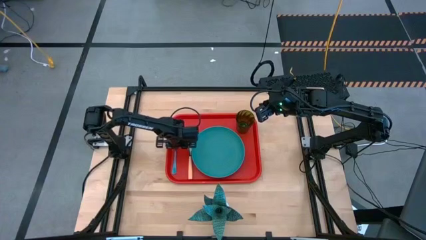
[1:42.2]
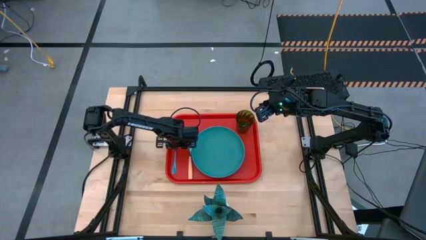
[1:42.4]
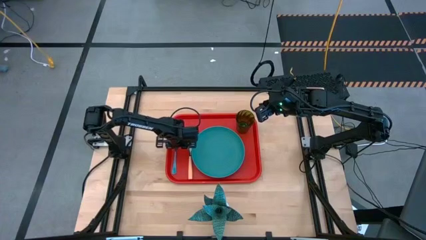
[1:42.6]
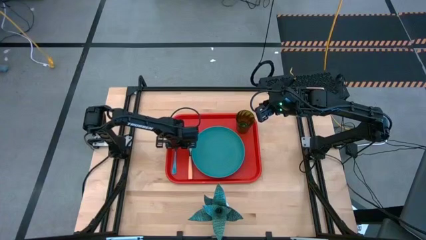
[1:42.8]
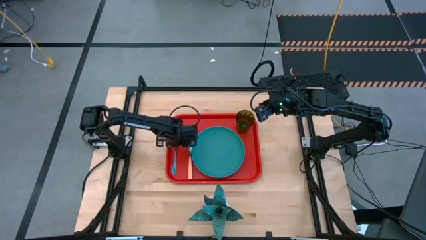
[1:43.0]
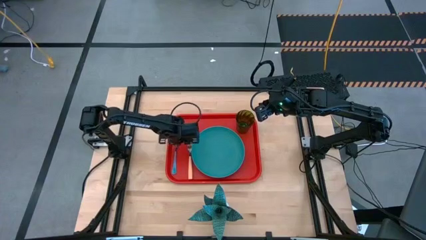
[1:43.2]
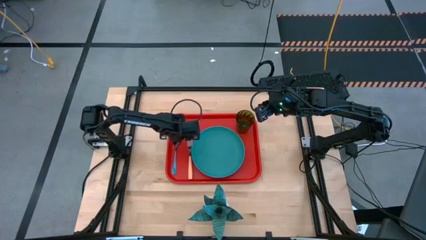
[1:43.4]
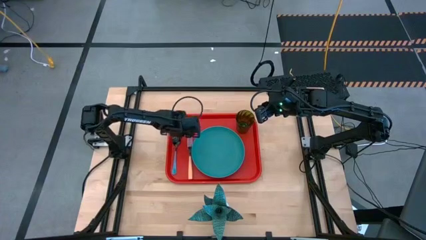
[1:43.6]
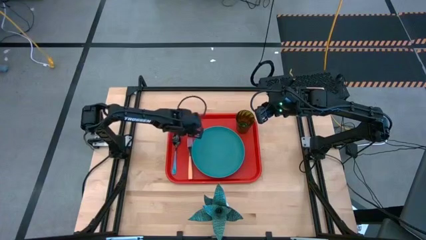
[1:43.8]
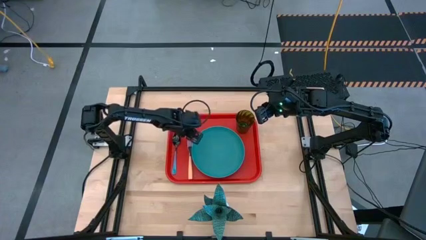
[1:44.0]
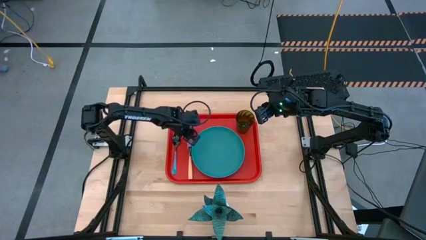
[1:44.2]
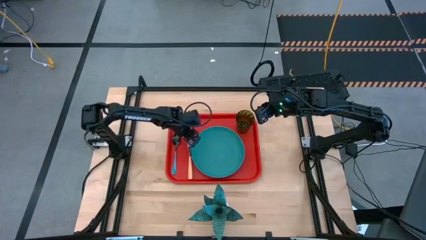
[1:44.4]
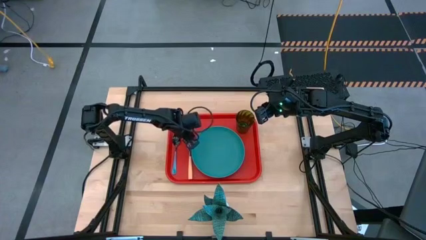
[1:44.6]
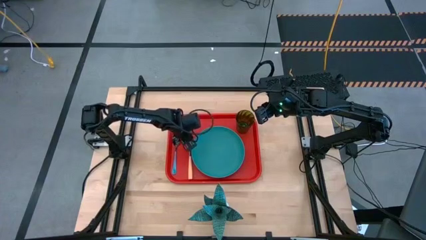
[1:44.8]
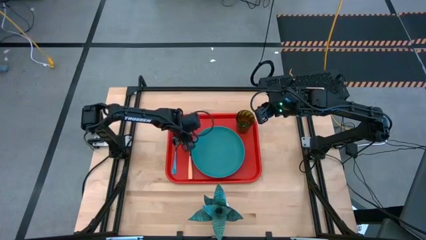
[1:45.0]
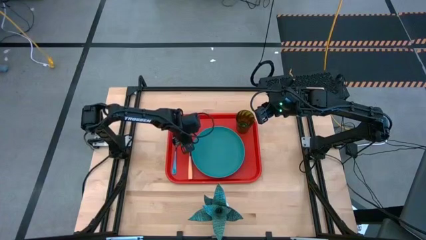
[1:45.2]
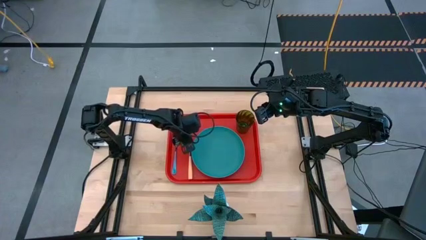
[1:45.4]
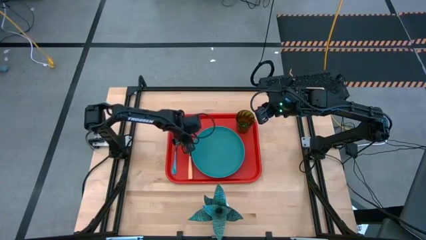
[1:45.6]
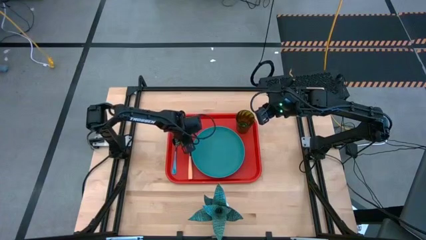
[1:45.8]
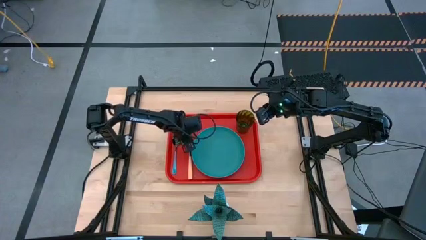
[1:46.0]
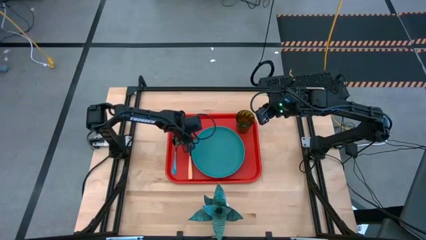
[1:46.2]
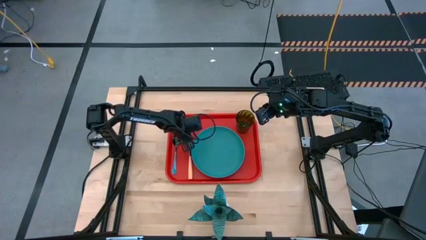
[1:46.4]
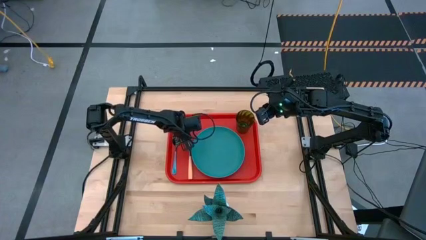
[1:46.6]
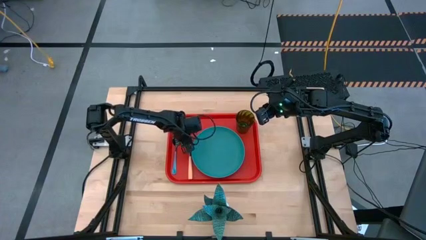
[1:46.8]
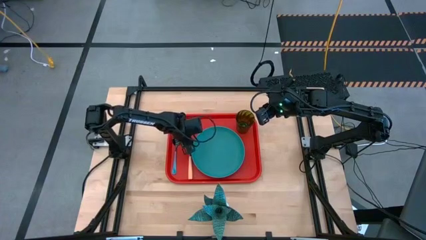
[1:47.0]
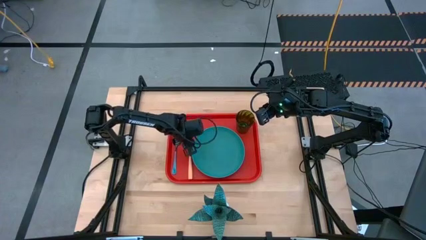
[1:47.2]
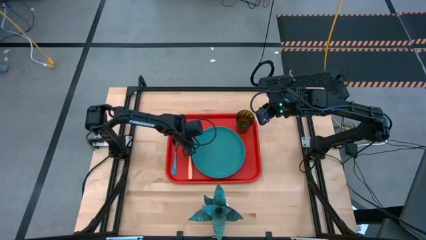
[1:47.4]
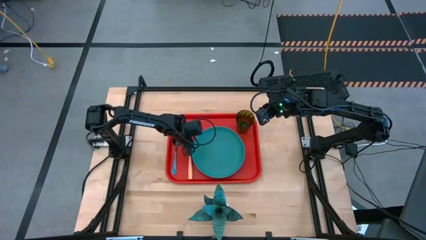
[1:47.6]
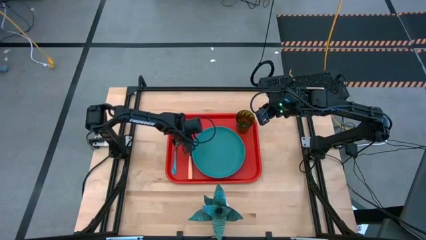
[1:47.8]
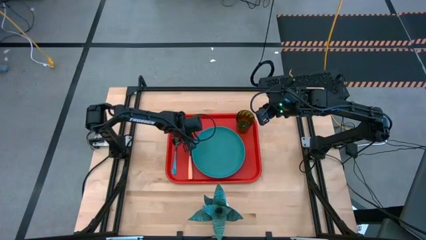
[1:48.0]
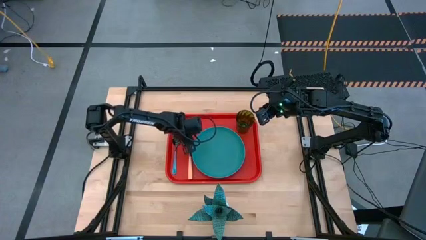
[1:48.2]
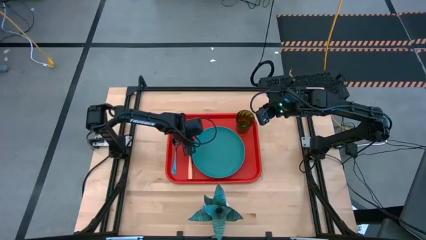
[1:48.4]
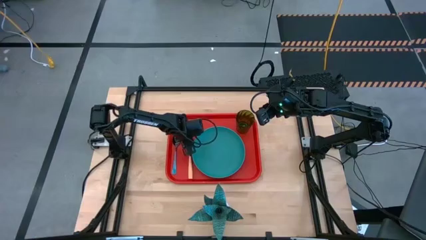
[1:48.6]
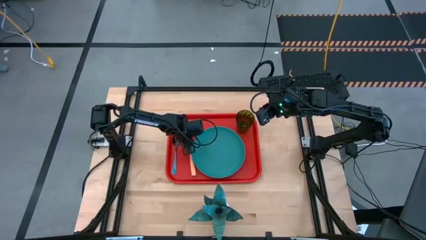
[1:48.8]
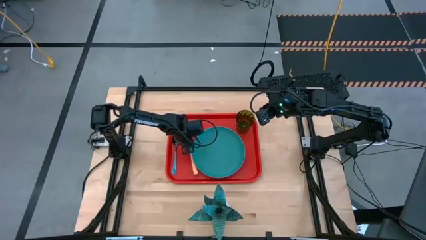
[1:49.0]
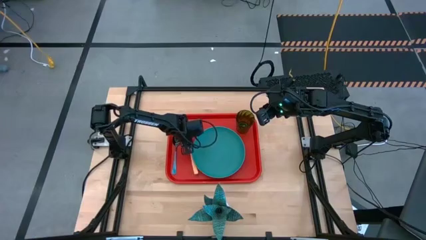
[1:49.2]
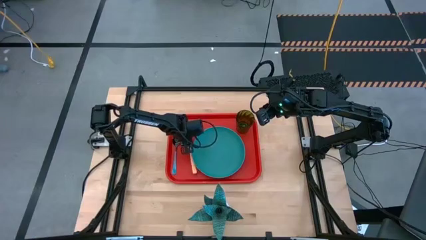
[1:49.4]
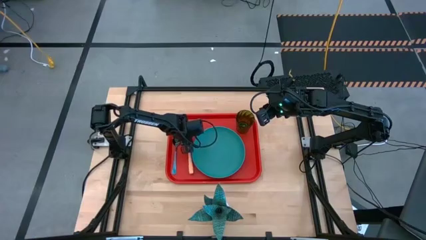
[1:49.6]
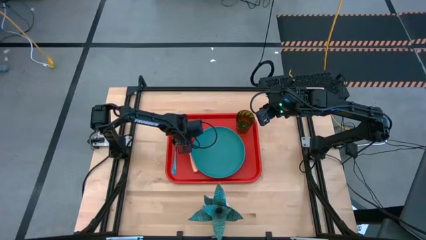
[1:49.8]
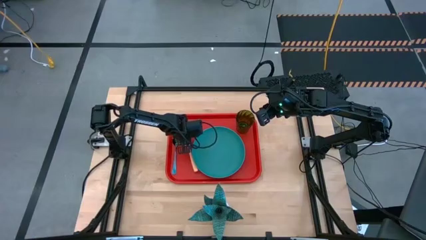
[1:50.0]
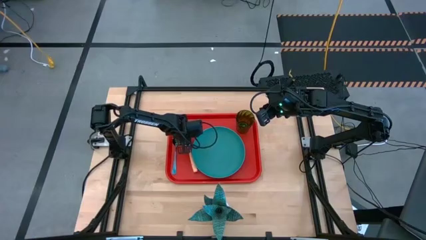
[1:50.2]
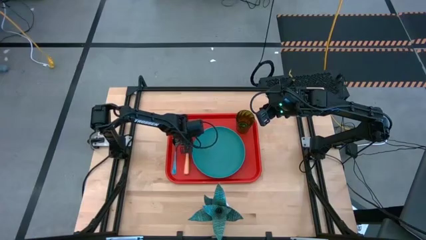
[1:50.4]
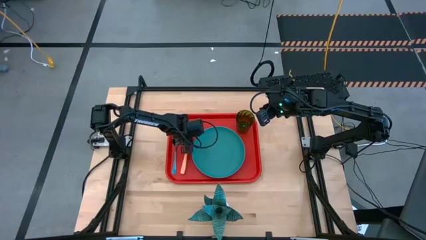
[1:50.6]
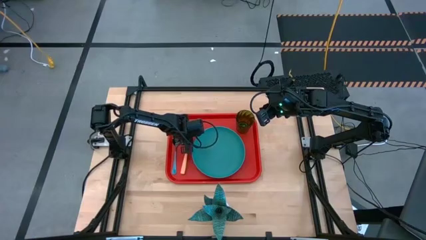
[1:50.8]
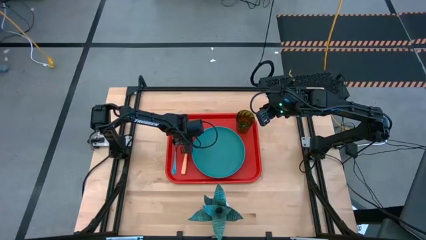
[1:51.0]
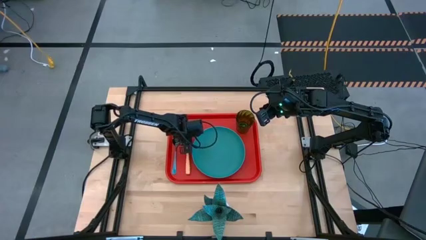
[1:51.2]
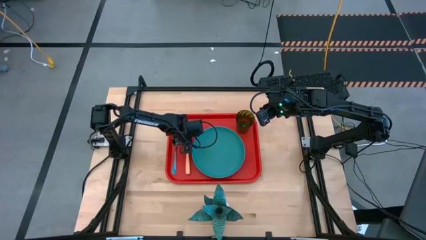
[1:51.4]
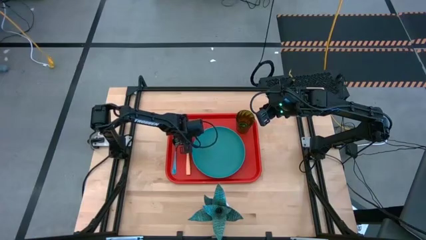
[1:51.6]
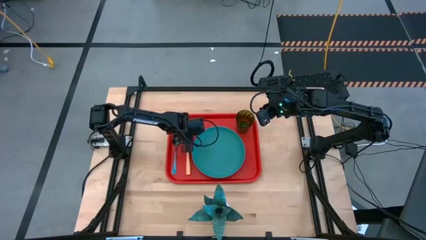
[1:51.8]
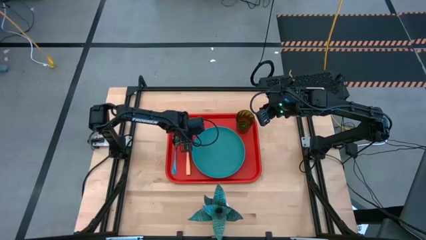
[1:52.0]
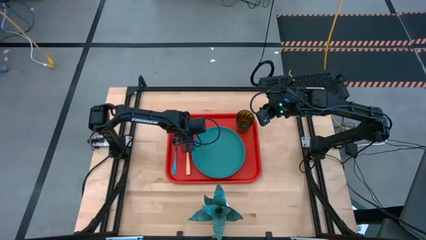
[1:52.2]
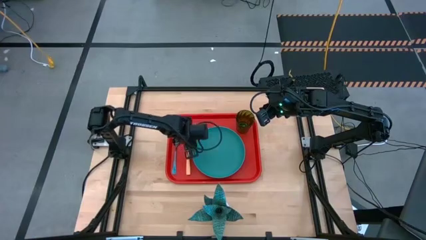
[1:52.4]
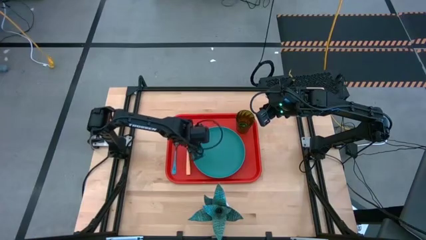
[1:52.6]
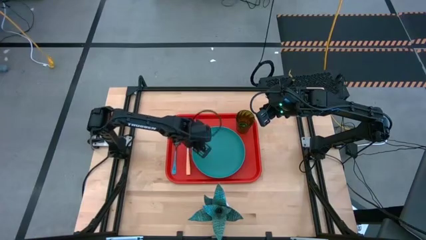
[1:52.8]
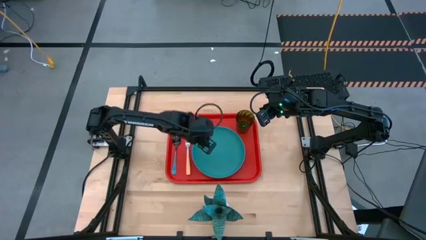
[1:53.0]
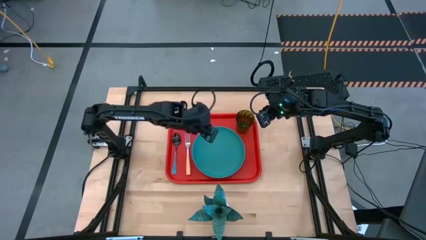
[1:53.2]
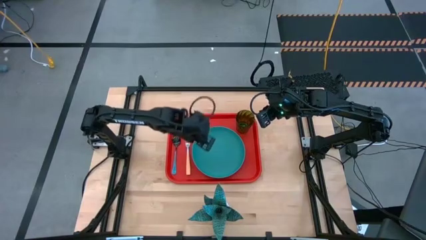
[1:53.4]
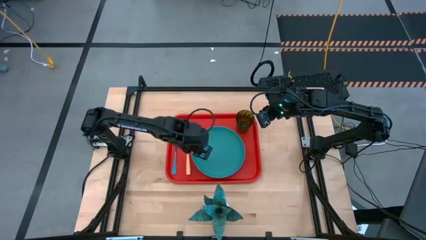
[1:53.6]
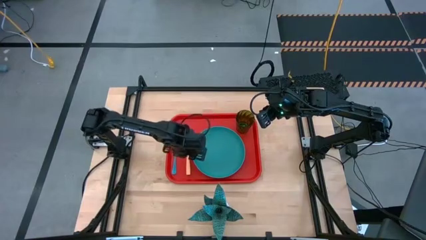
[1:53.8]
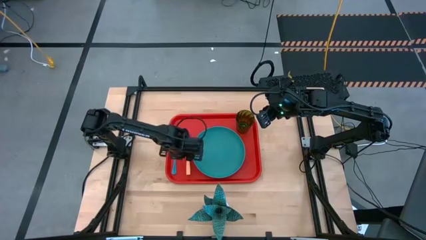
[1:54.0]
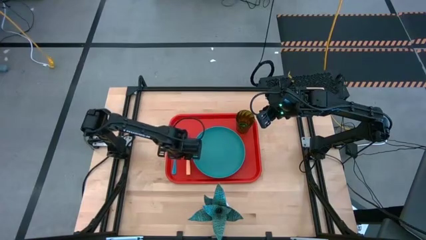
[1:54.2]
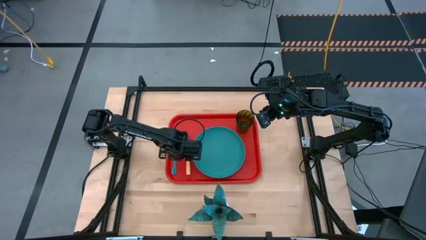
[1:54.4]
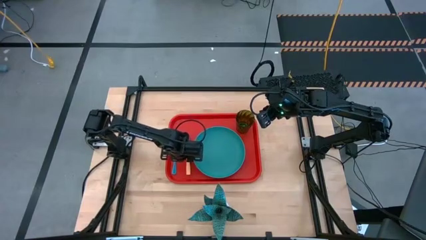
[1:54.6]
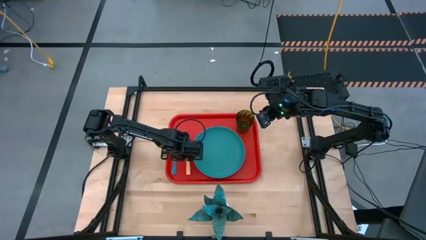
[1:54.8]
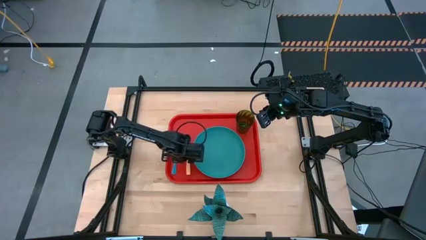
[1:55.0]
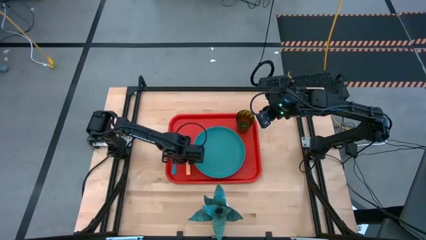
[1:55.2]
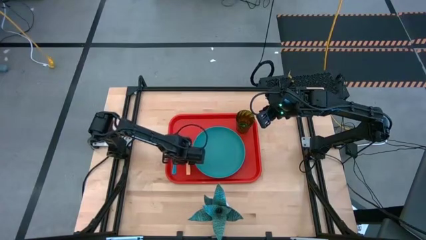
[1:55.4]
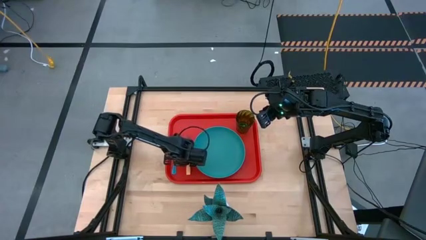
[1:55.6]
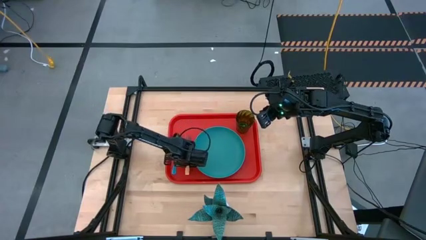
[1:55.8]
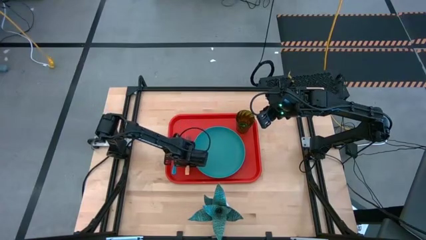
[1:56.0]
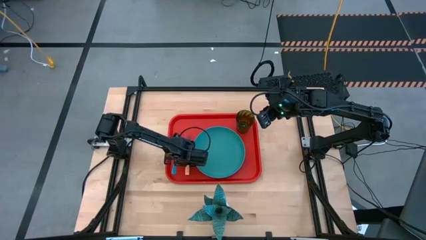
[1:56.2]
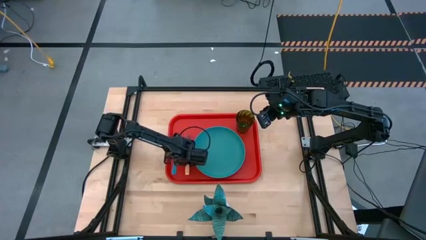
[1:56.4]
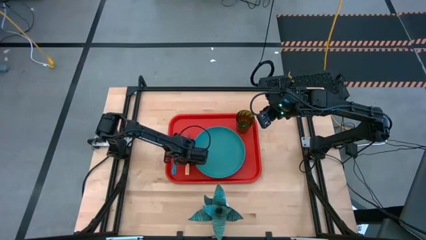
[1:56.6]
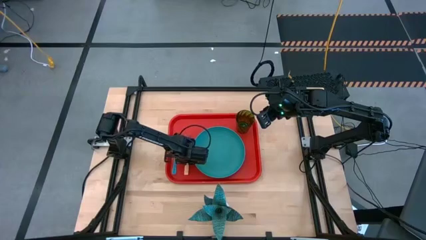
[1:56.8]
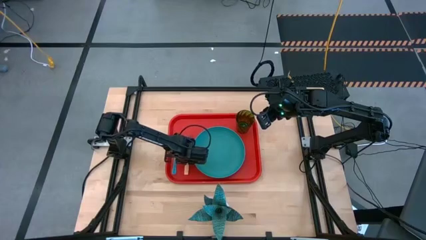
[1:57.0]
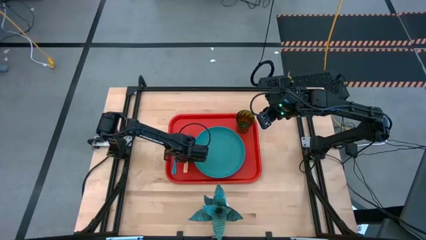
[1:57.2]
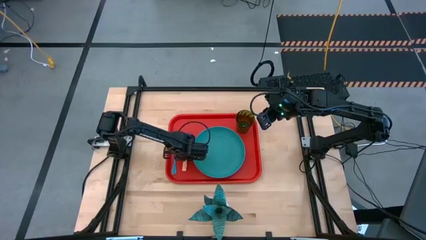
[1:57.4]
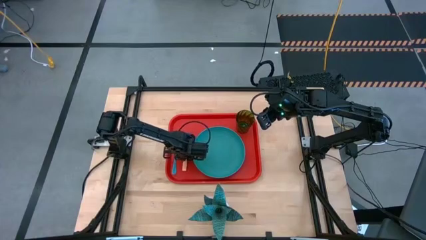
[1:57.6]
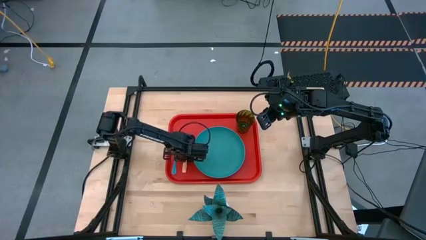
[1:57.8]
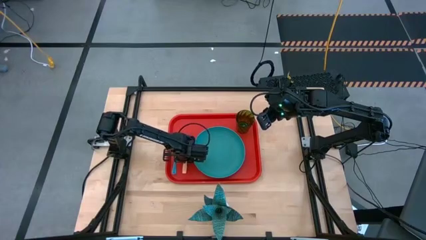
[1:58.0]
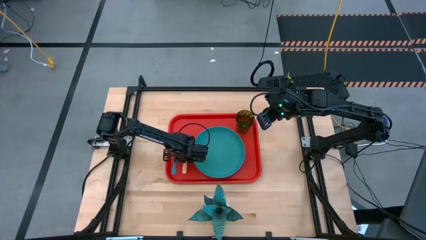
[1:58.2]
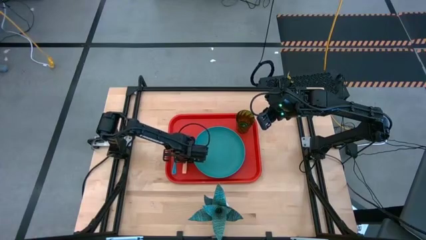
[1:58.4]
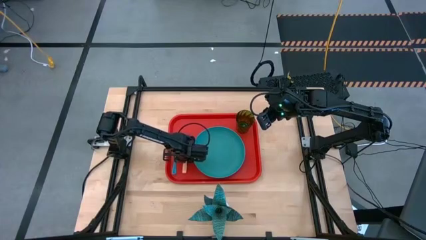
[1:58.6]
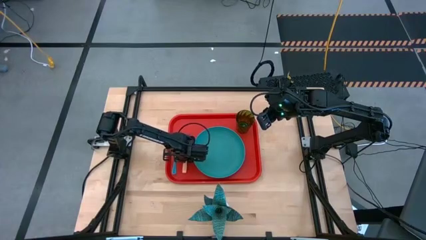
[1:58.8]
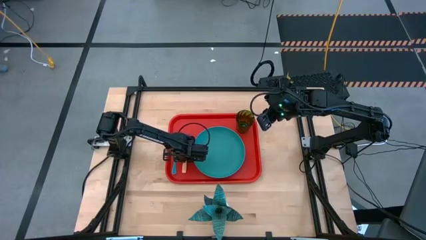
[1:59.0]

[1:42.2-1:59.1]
Task: Pick and place plate/cup/fork/spoon on tray
Adjust the yellow fork on the orange tray

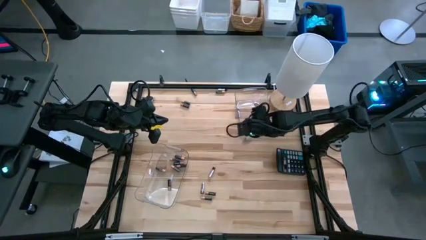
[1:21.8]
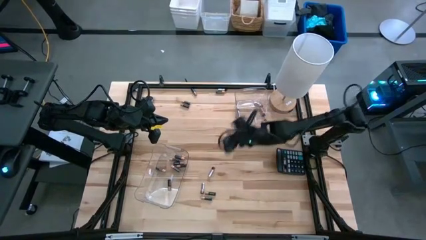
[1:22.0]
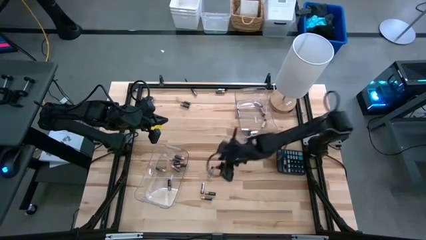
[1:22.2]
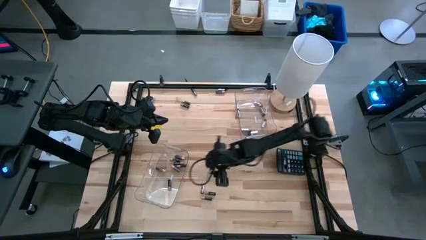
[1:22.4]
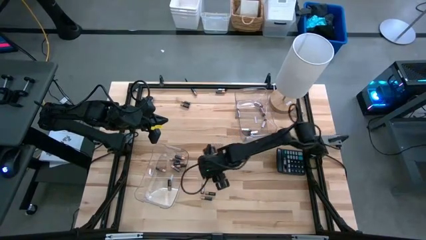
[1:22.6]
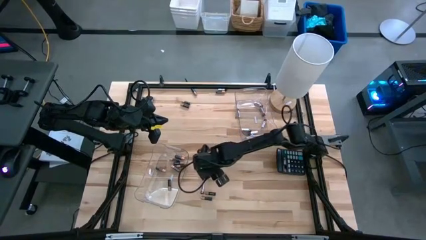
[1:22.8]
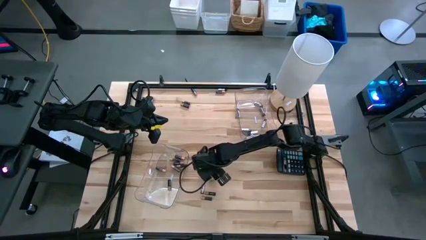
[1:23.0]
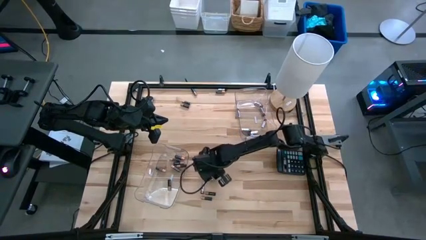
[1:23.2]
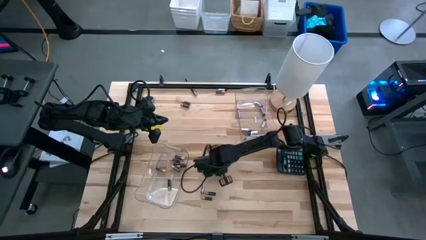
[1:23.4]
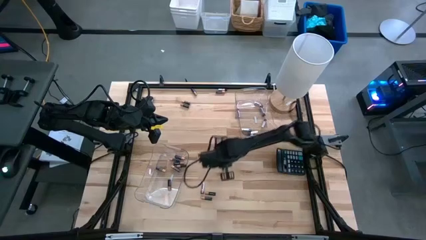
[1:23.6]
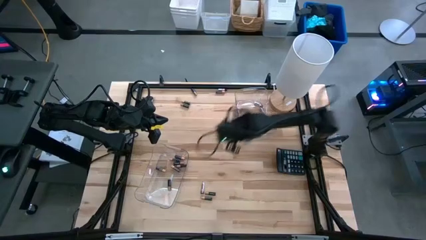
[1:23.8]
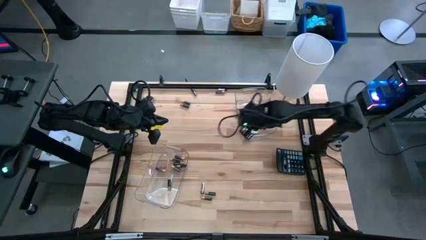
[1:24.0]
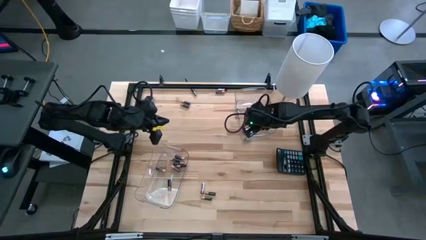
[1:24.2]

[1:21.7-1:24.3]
Task: Sort batteries
Put the silver battery into the right transparent bin
